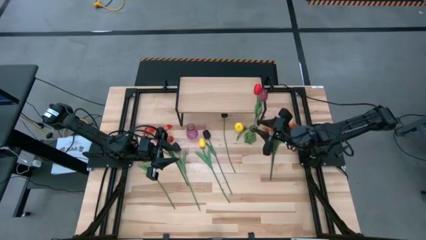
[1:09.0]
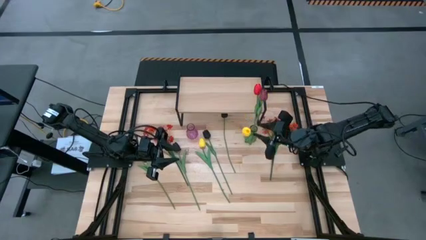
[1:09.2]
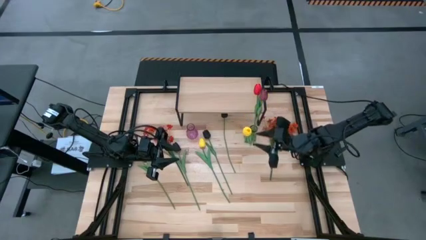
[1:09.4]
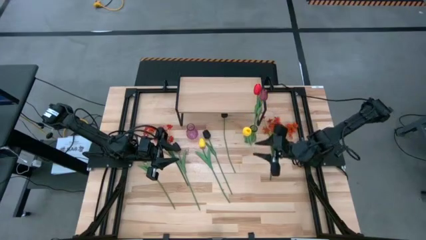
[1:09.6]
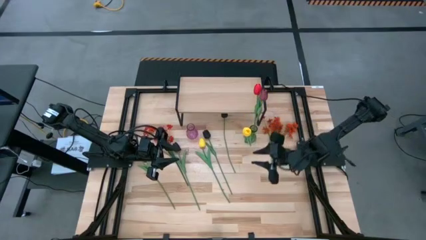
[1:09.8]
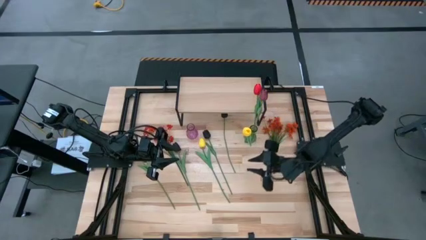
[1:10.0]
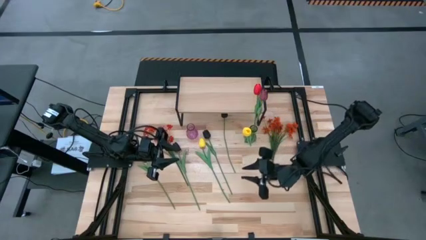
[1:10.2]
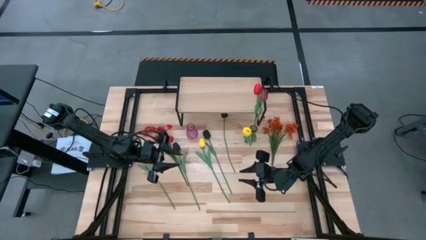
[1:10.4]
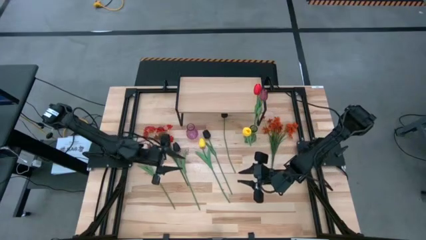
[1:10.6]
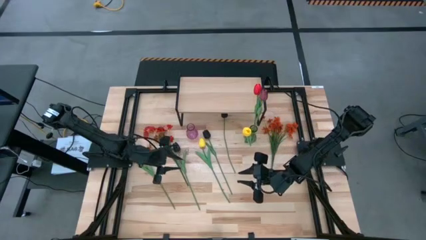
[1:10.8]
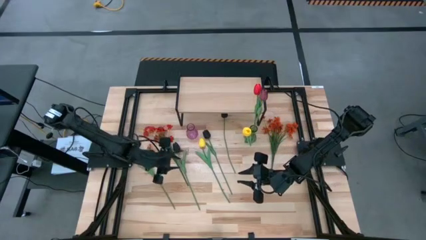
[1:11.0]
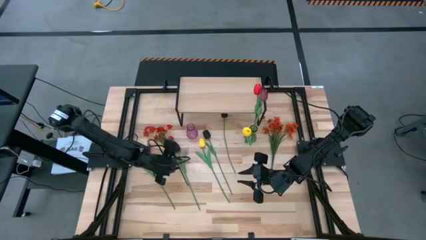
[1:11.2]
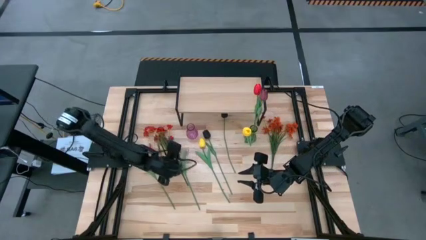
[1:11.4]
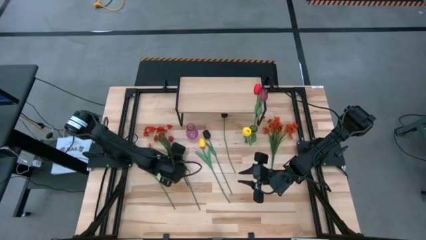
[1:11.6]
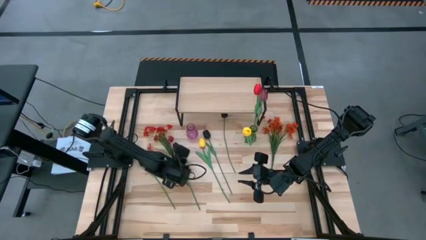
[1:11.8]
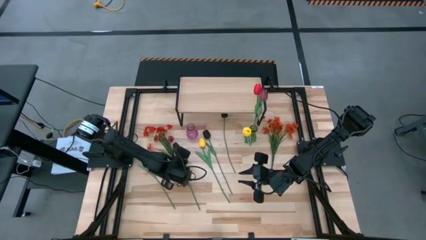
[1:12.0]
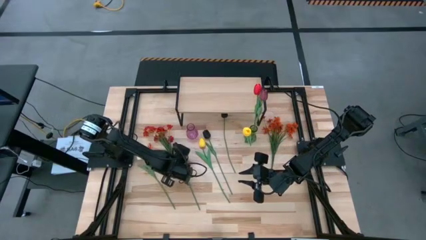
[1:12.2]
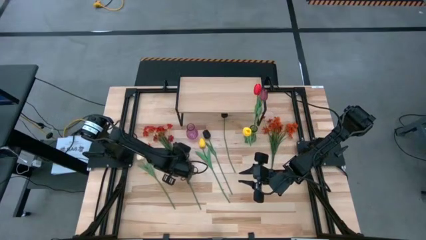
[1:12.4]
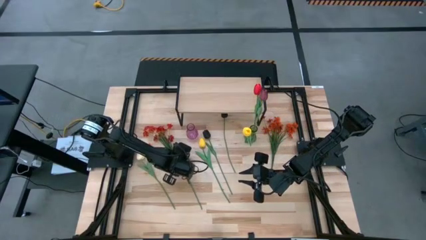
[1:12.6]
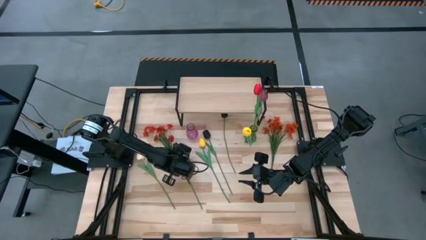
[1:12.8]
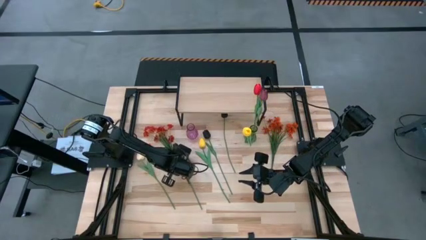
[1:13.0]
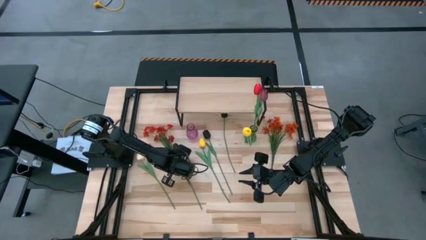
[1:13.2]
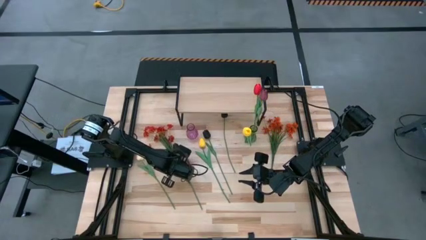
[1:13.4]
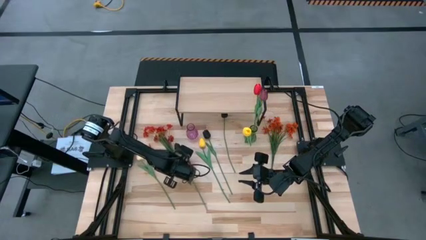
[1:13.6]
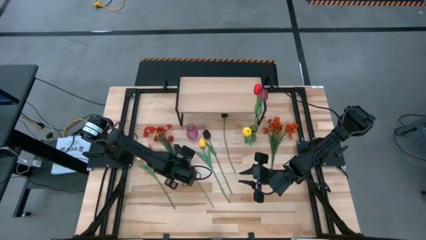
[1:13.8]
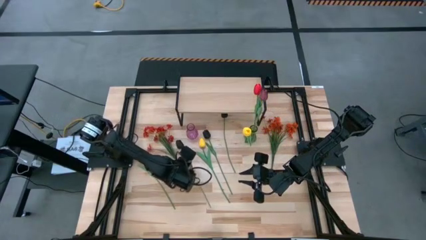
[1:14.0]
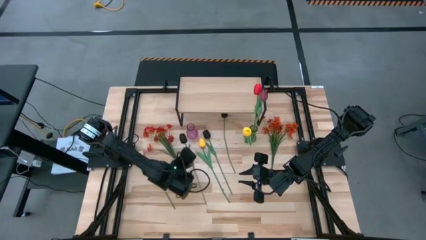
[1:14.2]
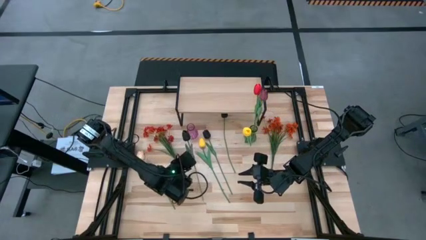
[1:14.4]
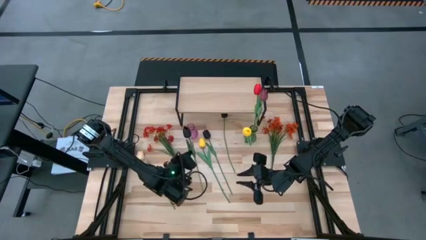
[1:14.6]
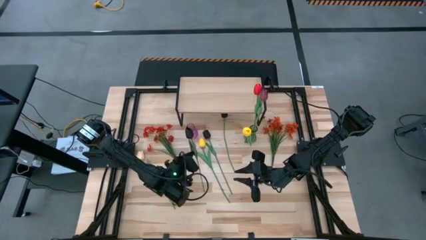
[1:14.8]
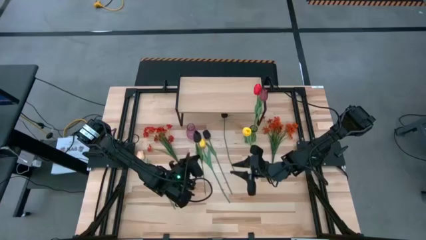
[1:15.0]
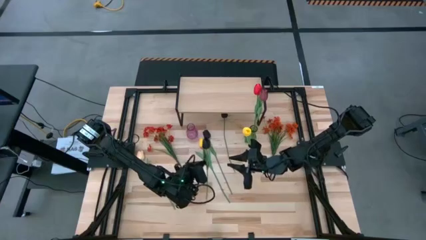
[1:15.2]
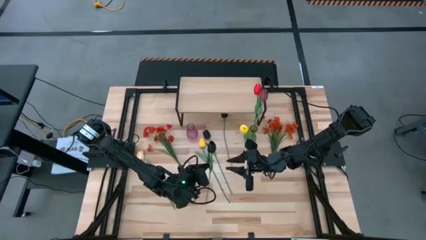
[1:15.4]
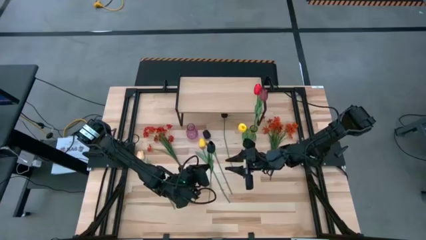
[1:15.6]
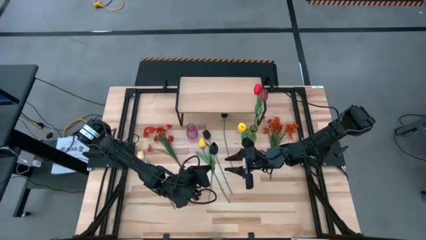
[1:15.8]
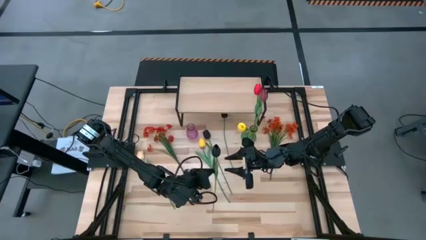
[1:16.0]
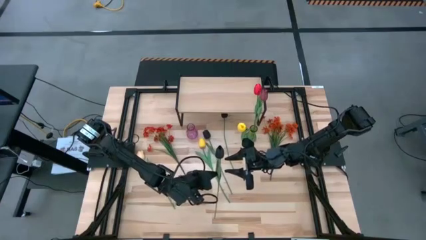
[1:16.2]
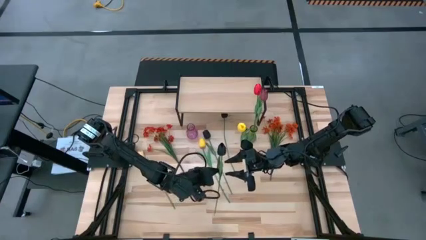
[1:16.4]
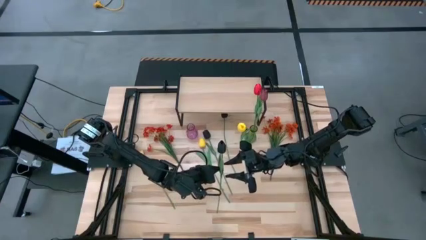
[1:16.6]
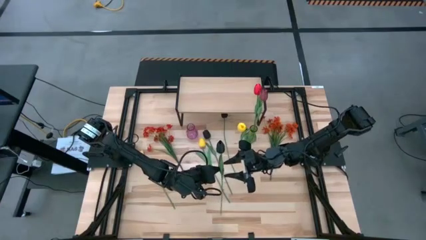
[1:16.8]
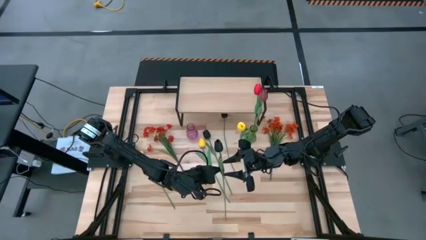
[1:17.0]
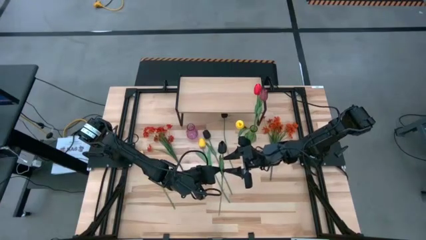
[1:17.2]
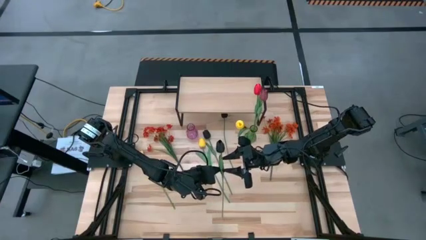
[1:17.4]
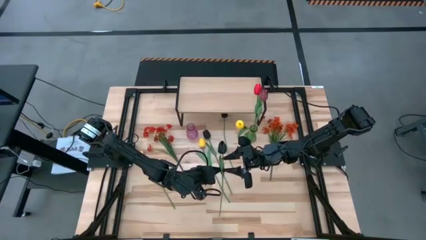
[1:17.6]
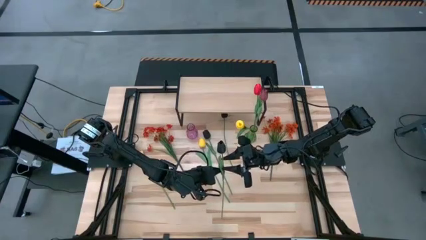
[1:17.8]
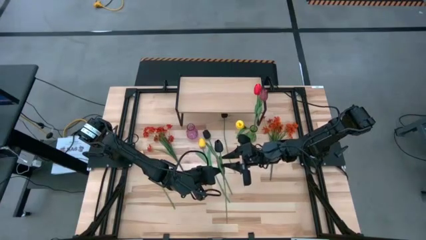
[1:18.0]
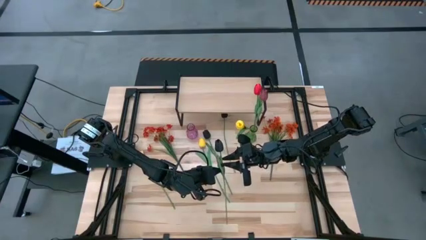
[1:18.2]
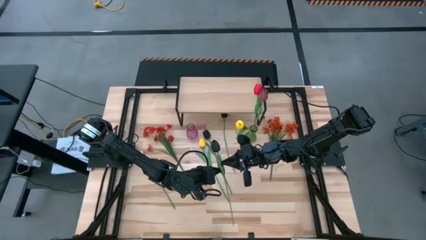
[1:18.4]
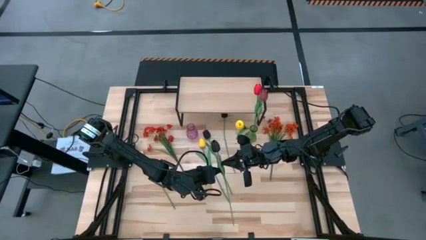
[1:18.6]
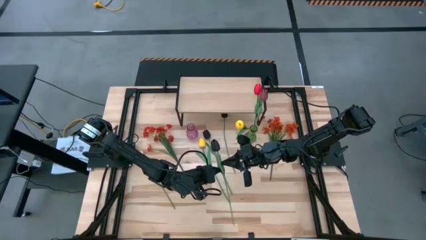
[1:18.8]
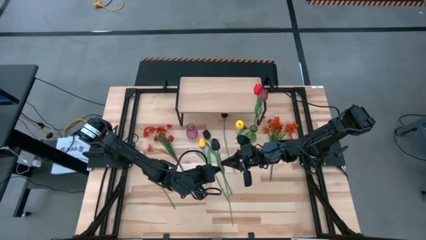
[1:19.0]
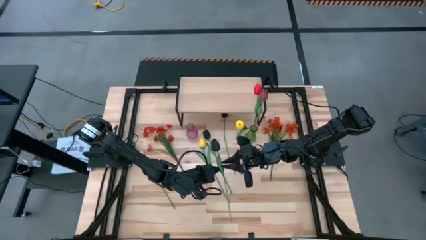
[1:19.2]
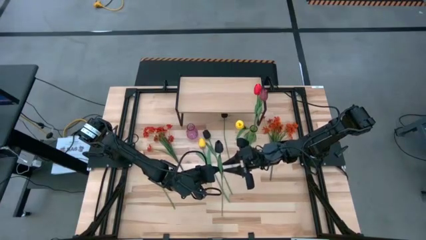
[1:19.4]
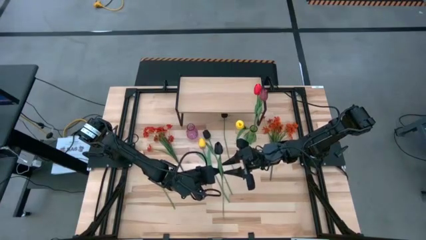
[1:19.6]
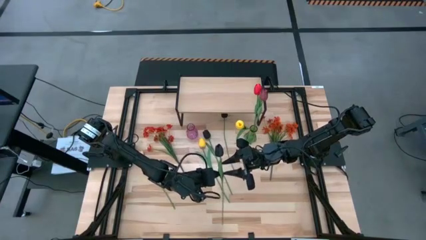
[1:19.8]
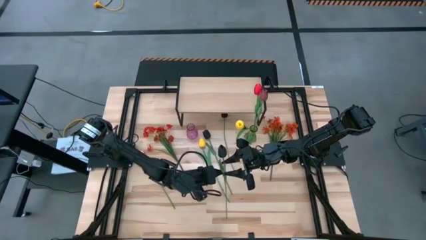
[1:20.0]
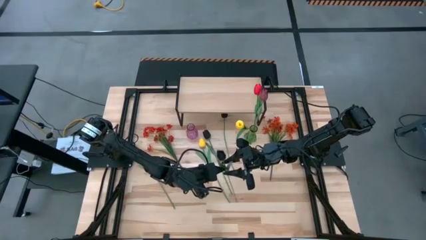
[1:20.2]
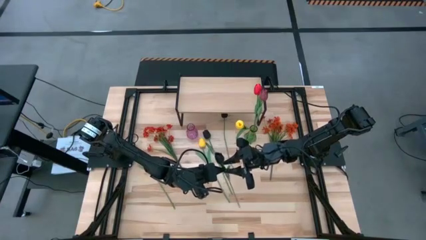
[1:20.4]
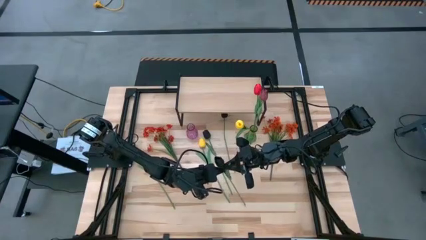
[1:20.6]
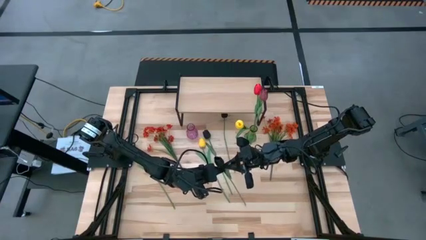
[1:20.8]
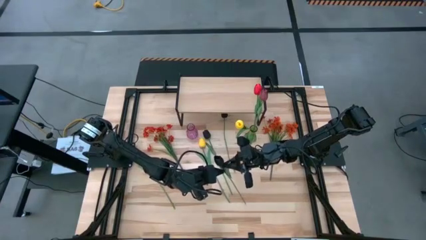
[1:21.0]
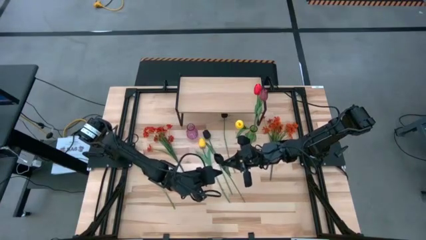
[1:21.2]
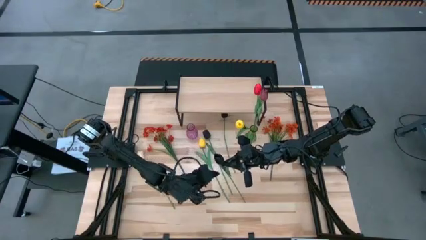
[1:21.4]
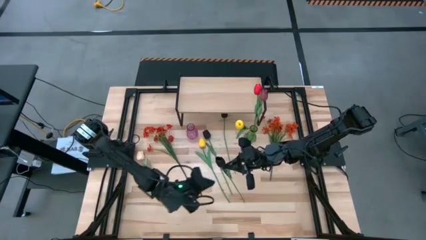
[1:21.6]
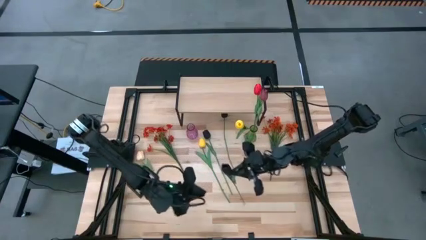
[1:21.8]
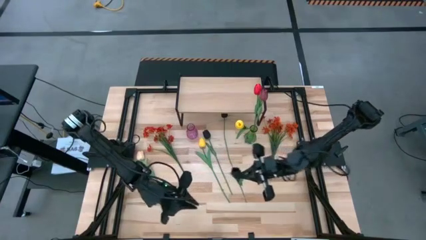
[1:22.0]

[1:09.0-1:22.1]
Task: Pick and place flowers into a vace then onto a shelf
Put the bottom left black tulip into the green vase
